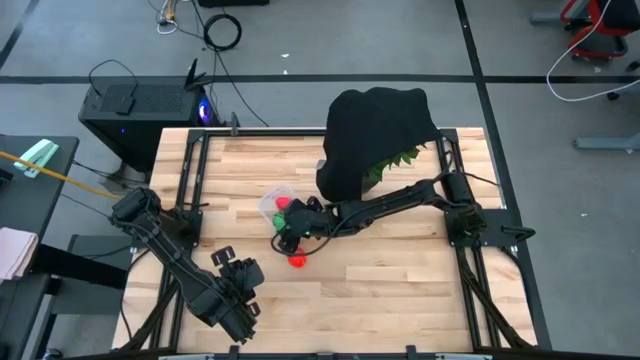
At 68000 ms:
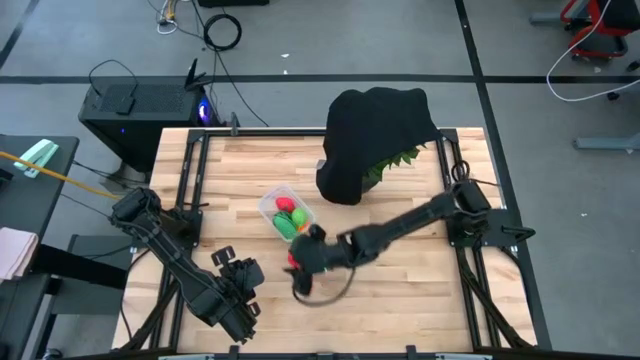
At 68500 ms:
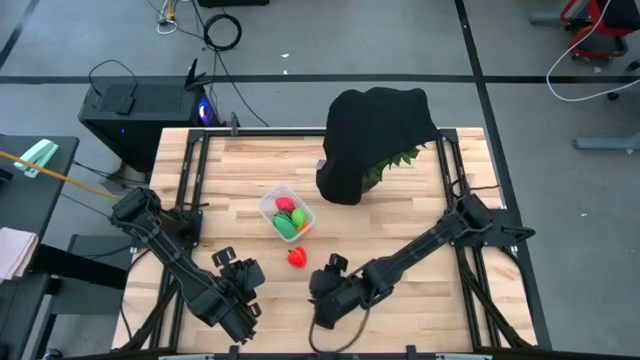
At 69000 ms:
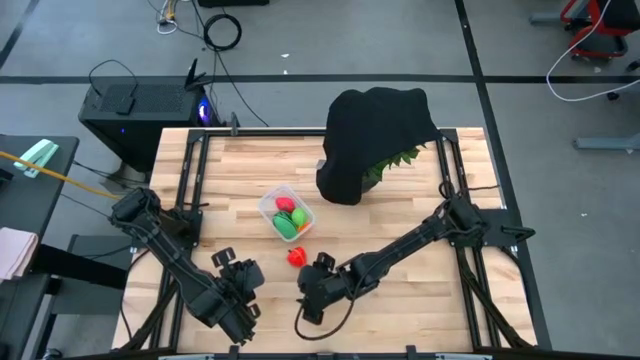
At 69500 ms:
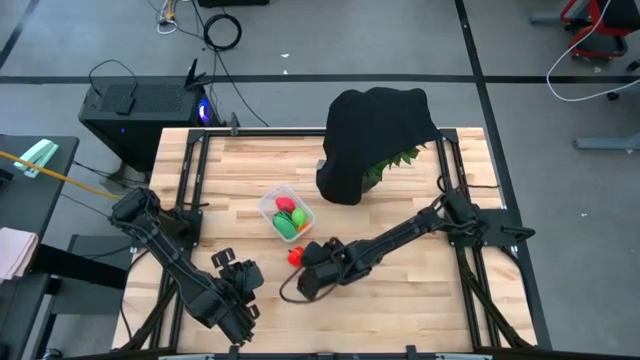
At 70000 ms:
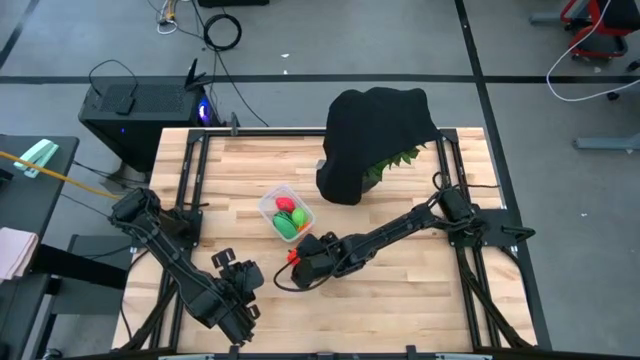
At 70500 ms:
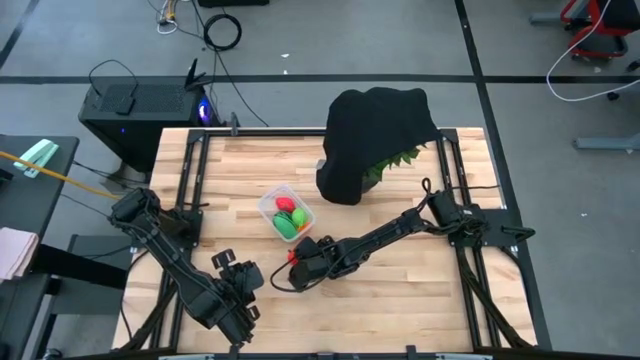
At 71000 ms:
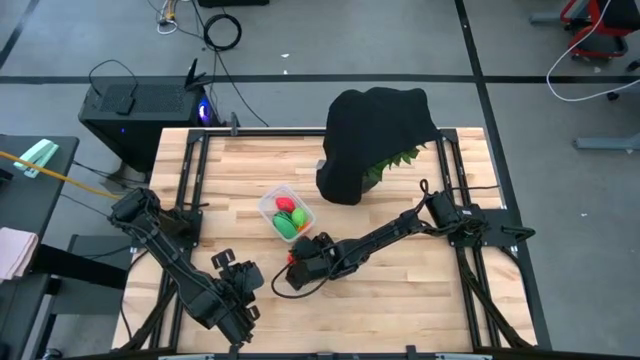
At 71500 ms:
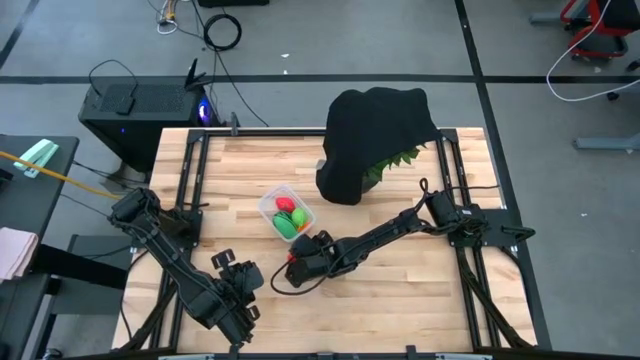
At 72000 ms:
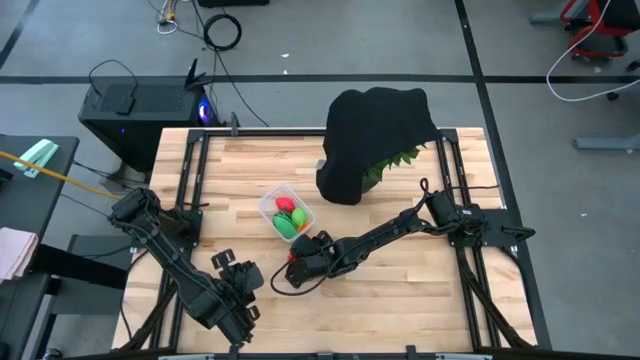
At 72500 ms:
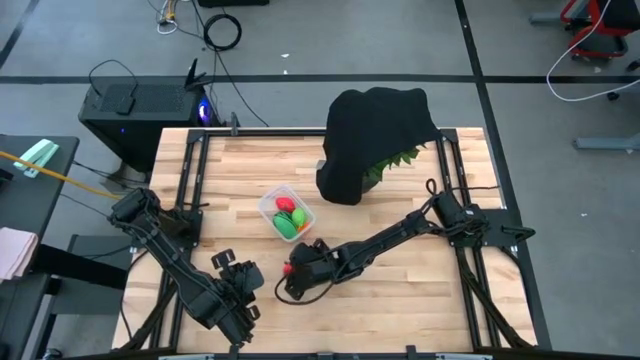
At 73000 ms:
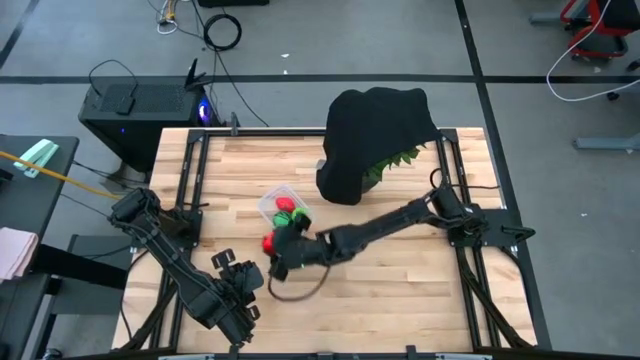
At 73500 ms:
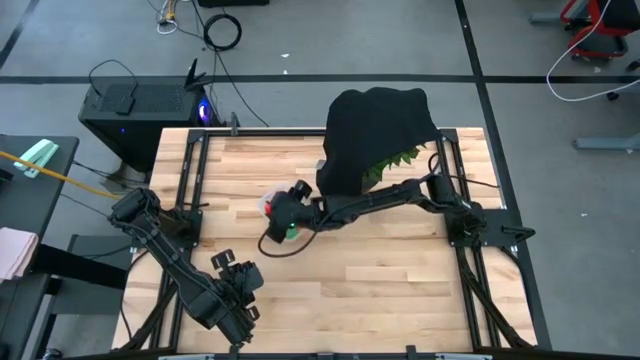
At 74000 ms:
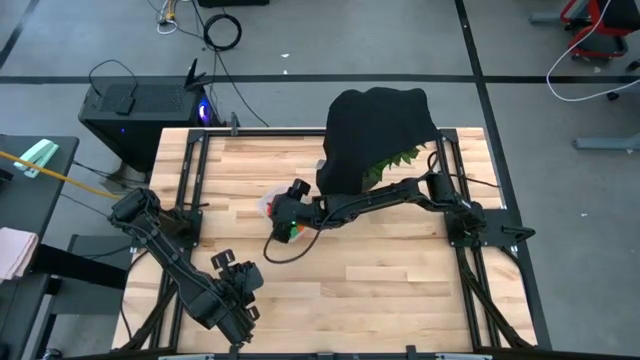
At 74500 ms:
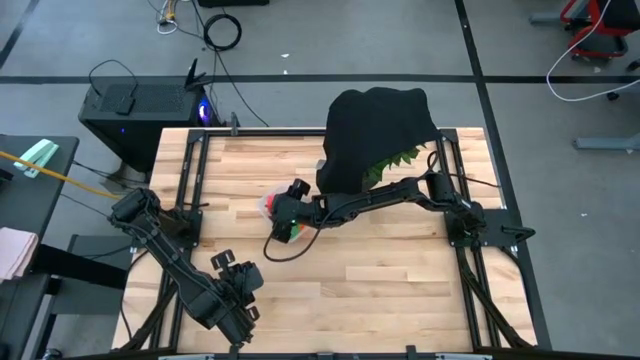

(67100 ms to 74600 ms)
Task: Pick and placing Produce into tupperware
Put the red apple into the transparent bin

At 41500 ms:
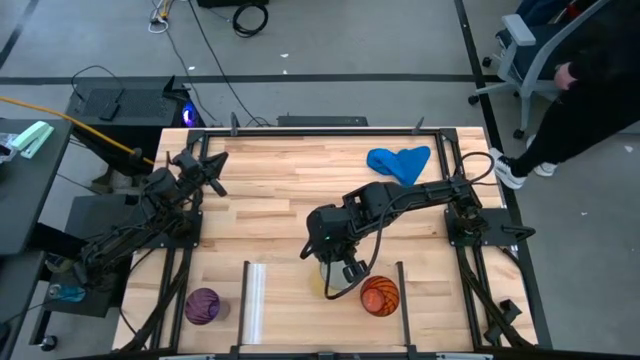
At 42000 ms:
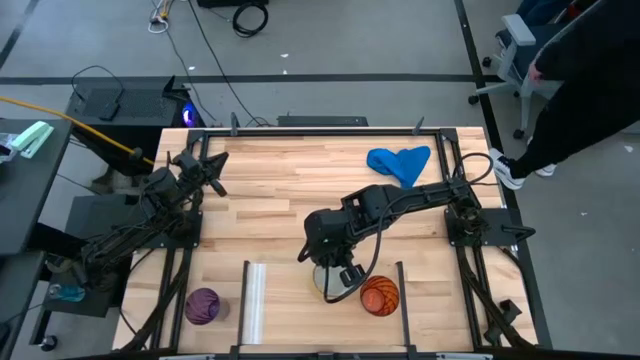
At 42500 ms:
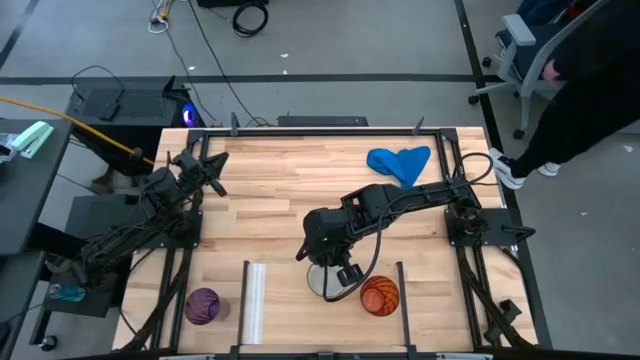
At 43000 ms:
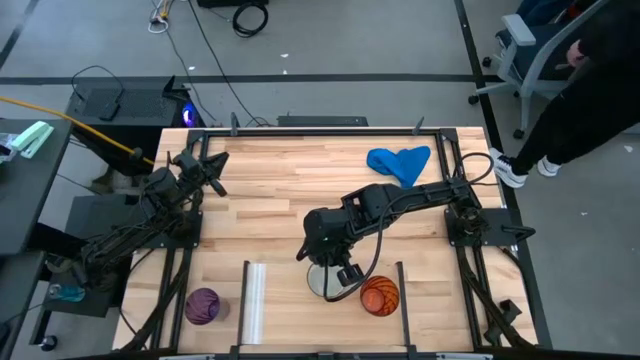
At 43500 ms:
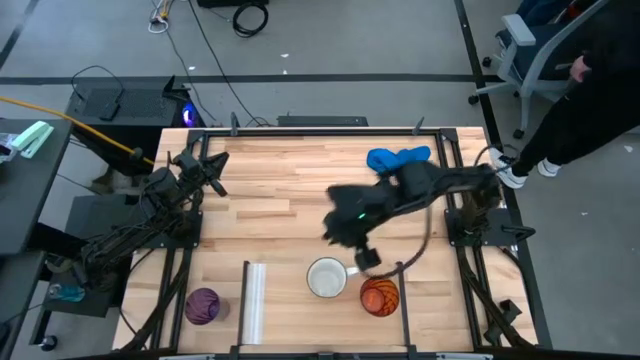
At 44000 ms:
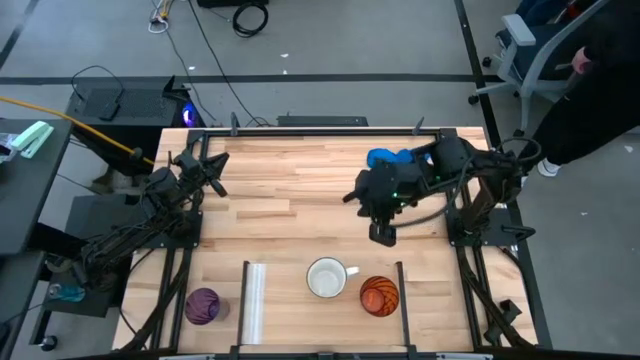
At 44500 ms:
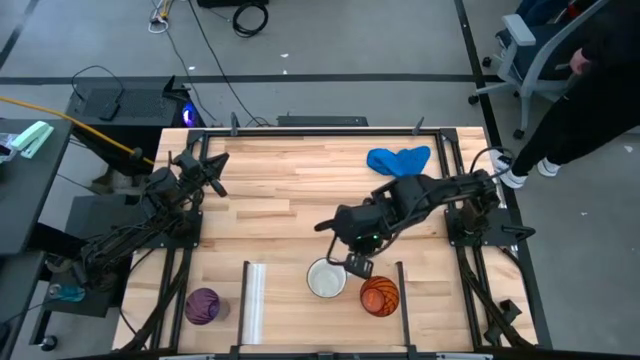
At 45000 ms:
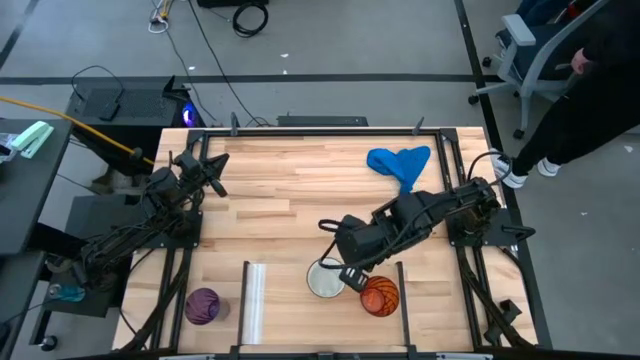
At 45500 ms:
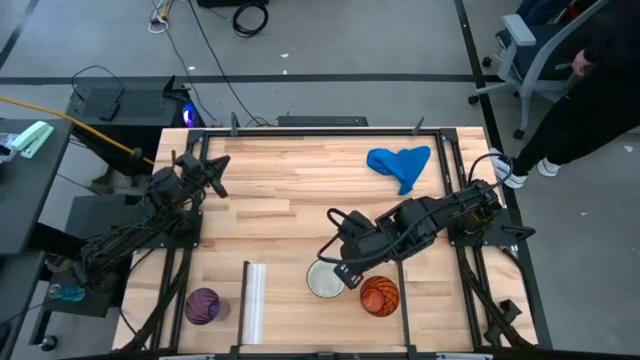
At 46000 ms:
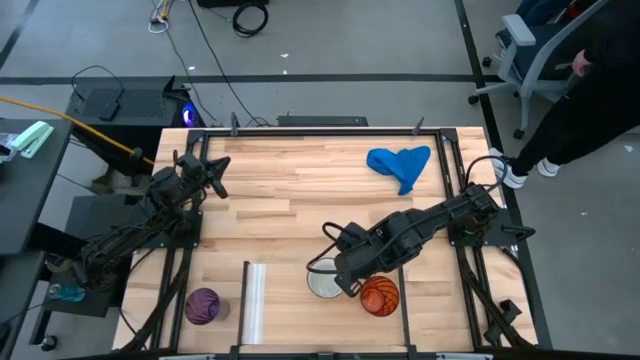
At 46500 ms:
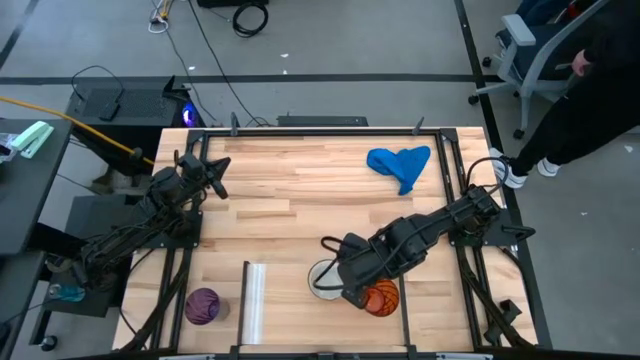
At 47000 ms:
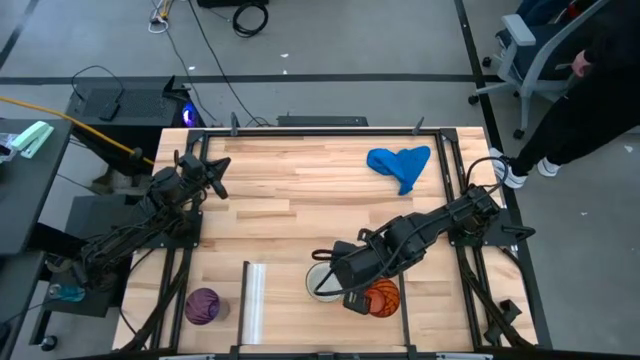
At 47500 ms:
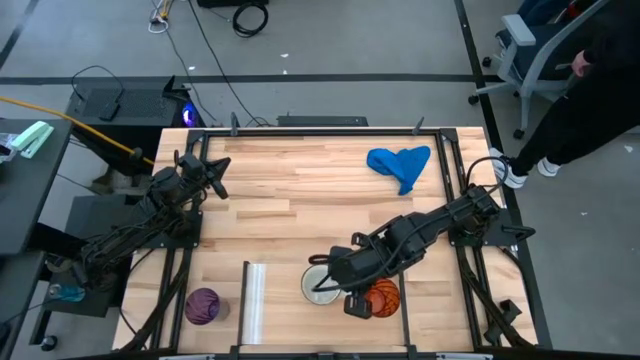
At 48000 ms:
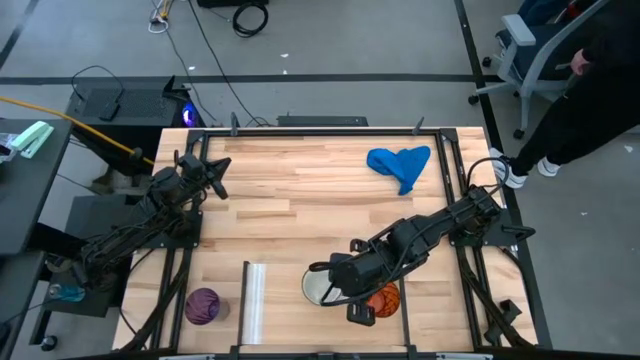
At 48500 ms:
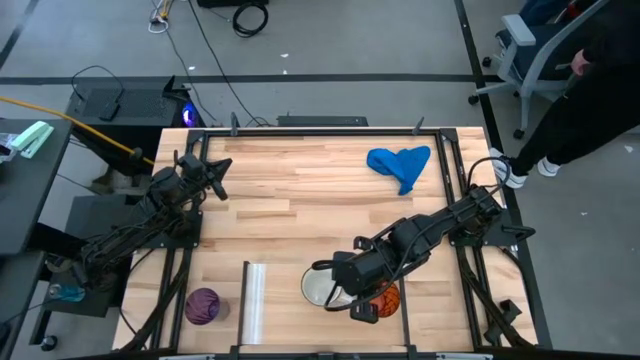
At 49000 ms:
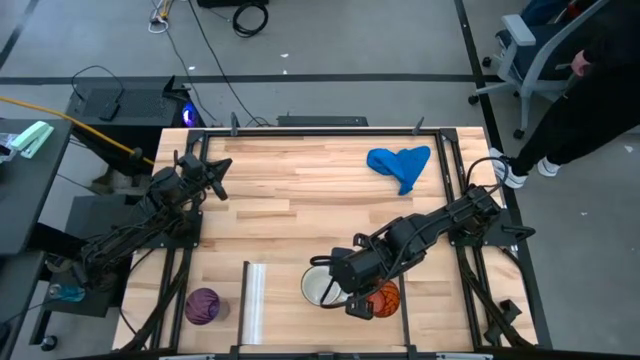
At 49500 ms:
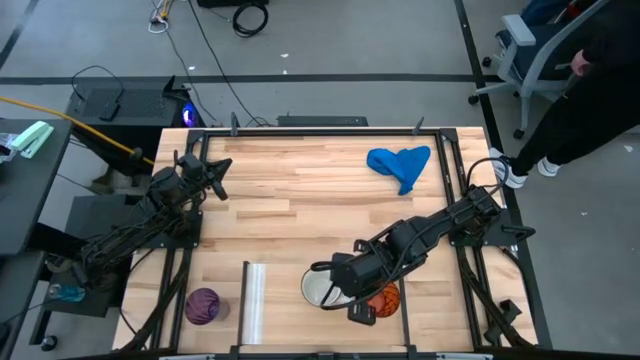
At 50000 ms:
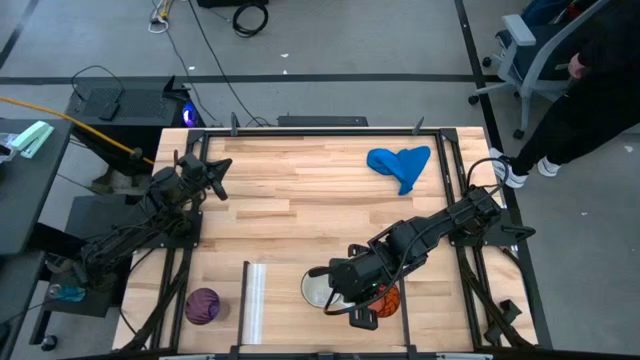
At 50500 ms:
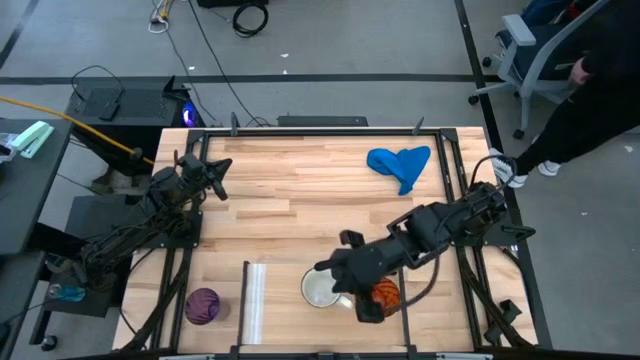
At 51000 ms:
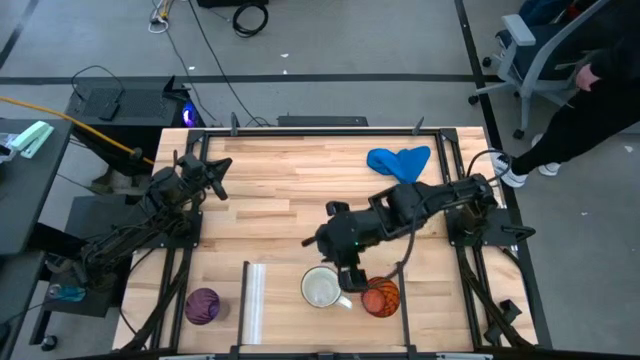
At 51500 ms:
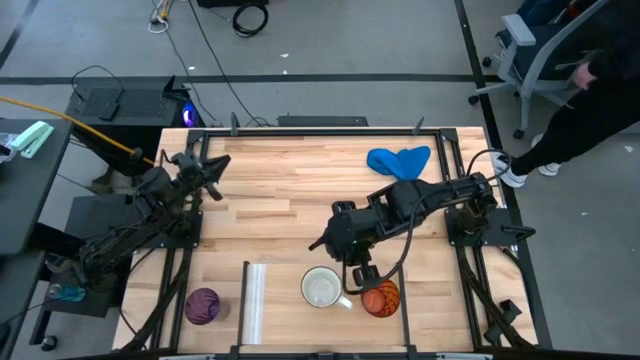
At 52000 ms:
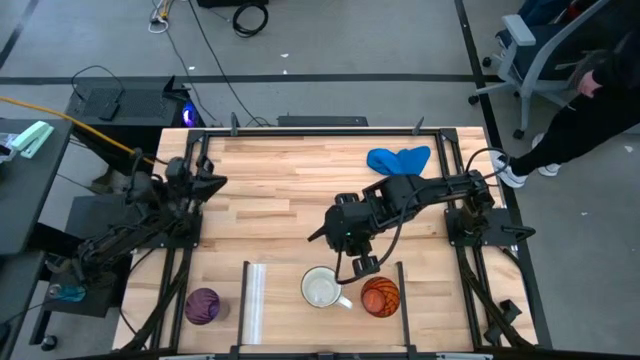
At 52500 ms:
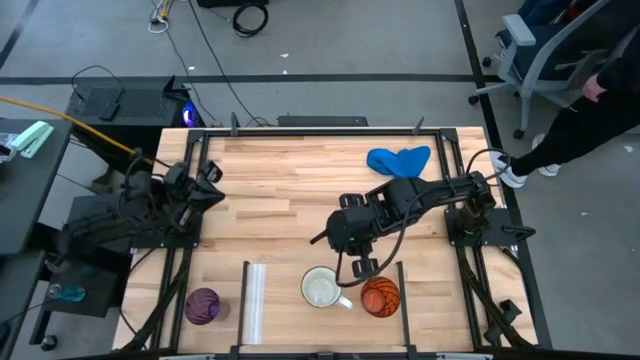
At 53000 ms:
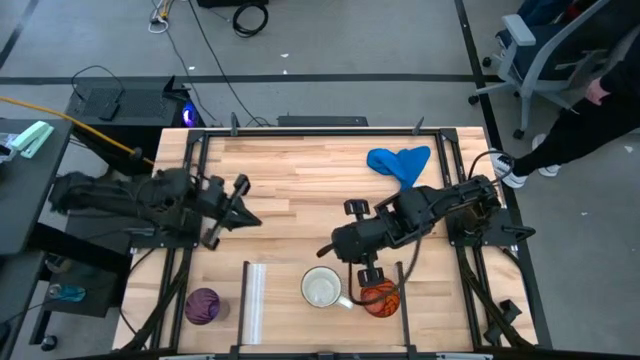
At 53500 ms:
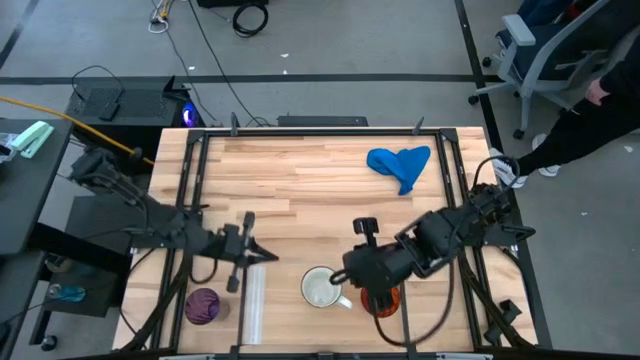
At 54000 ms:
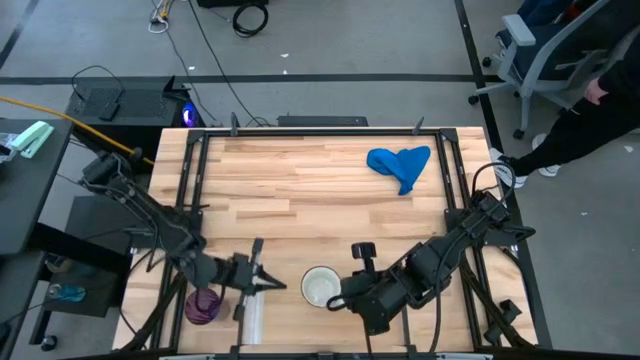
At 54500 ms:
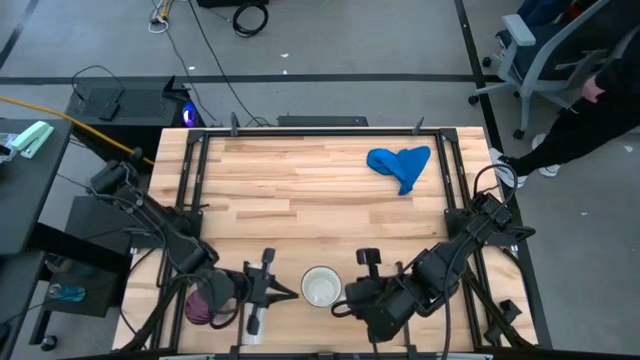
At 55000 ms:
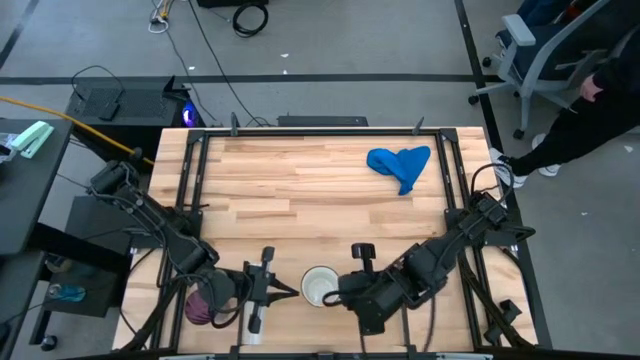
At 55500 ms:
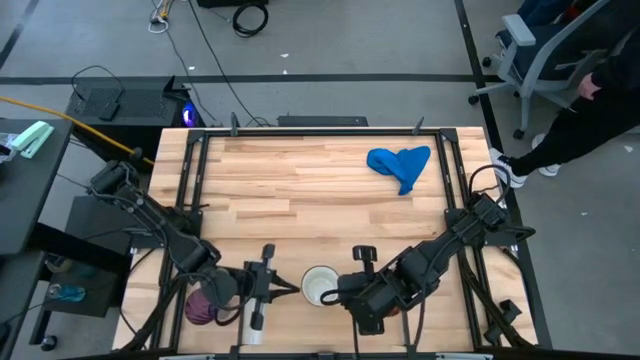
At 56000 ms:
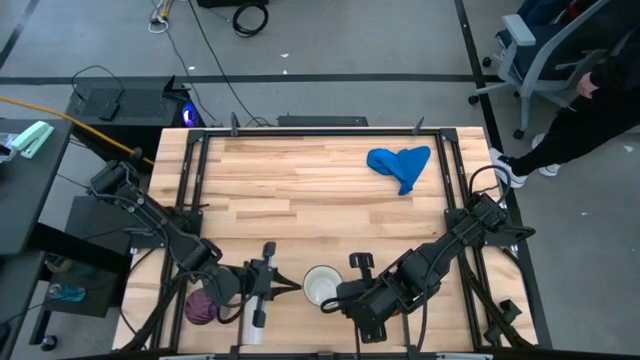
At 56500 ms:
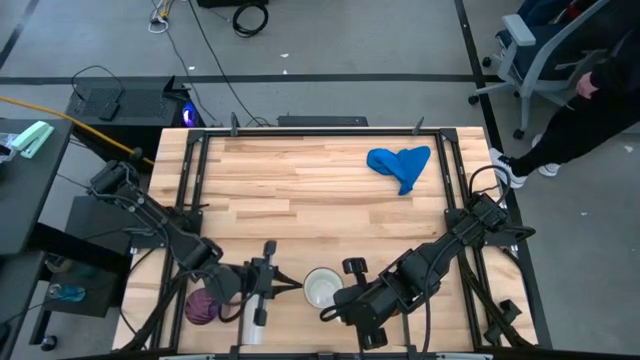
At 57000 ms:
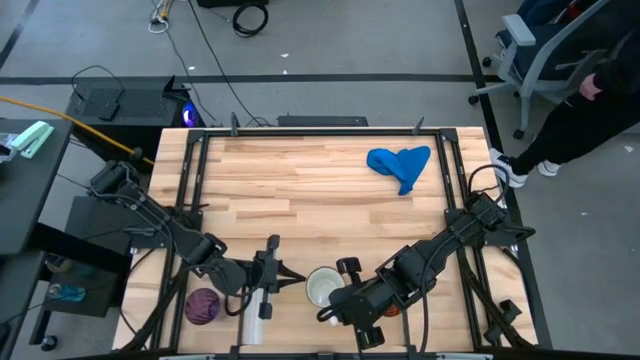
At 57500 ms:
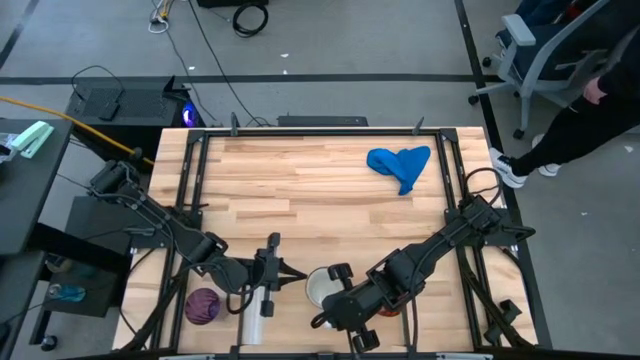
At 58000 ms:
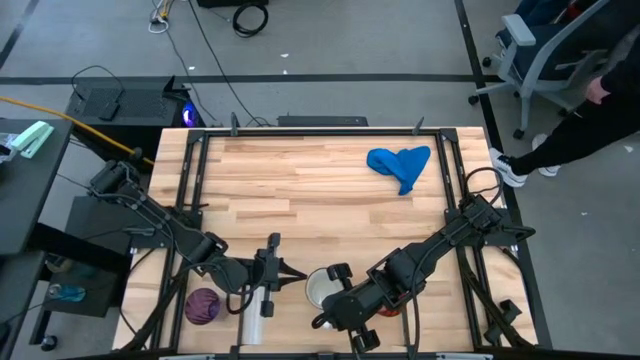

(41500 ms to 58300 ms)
Task: Stack small to large cups/mugs on shelf
Put the yellow mug on the shelf
